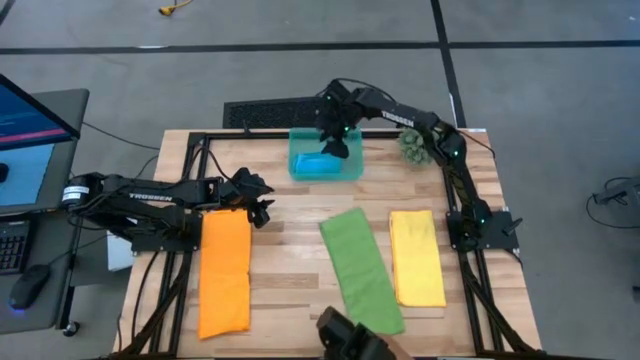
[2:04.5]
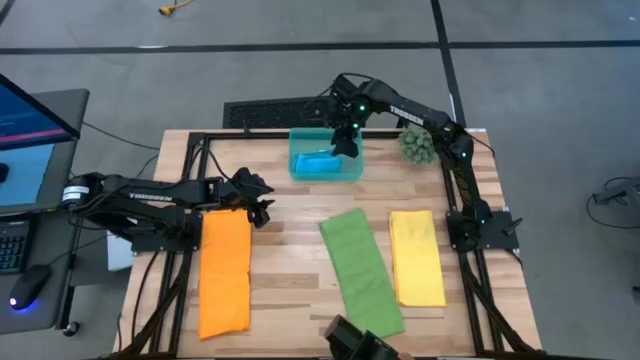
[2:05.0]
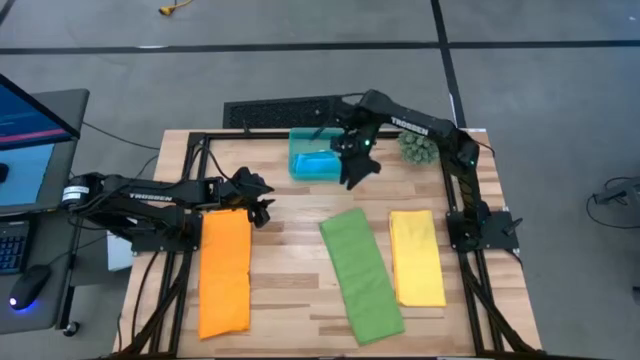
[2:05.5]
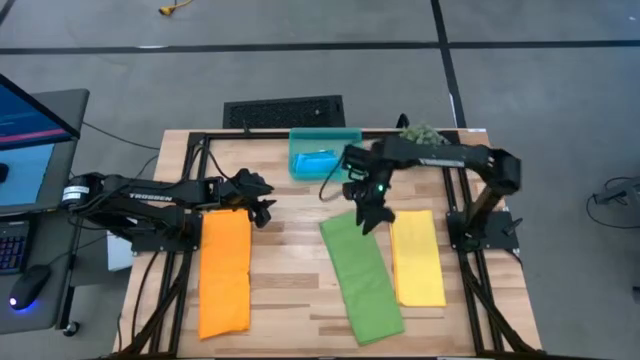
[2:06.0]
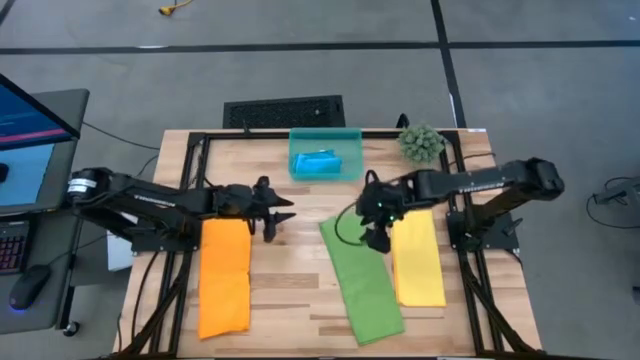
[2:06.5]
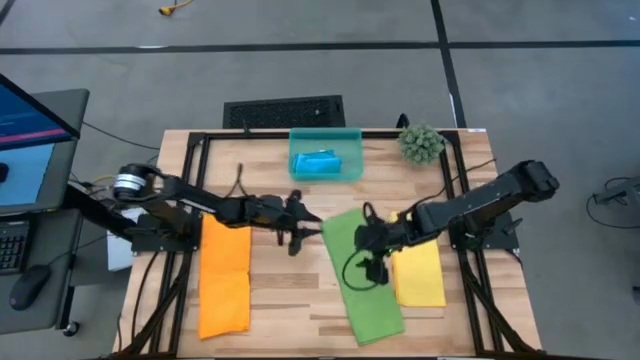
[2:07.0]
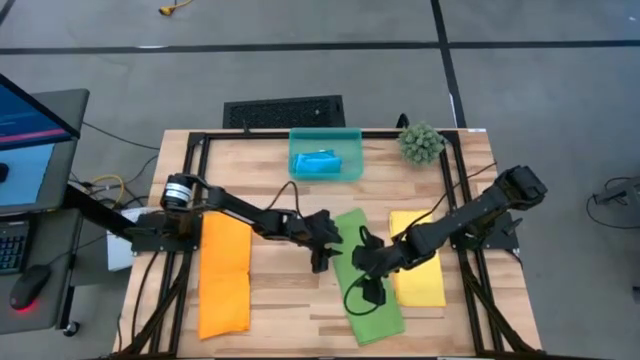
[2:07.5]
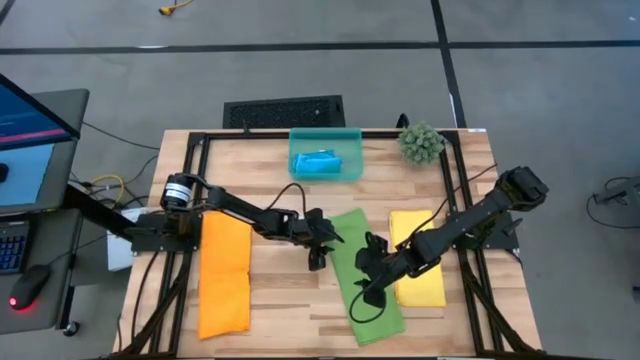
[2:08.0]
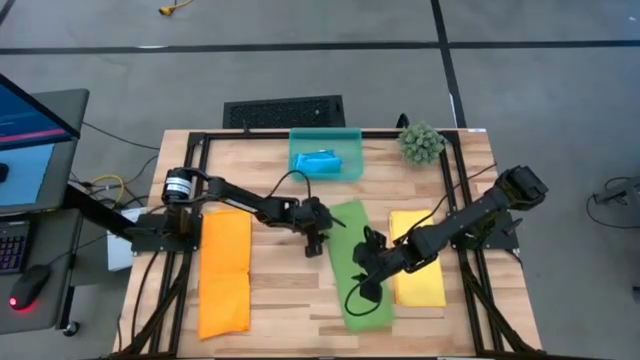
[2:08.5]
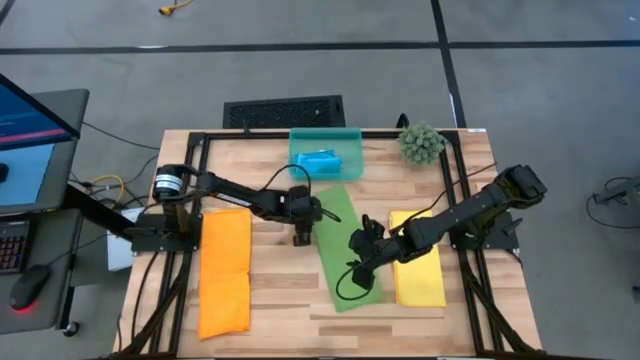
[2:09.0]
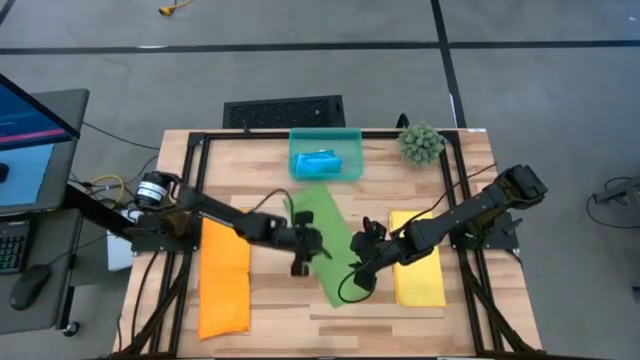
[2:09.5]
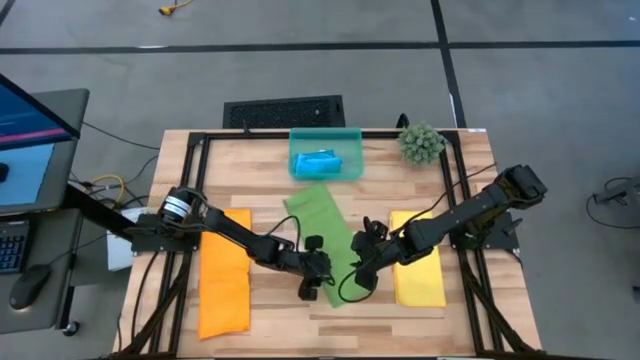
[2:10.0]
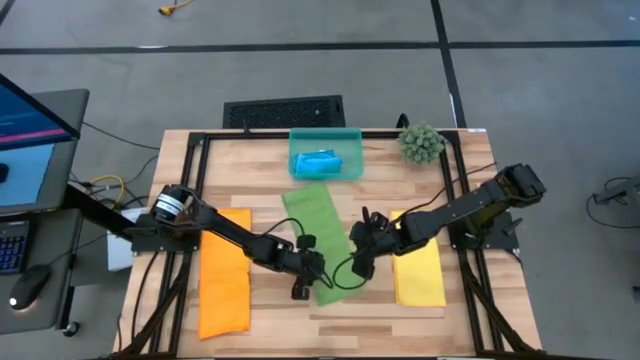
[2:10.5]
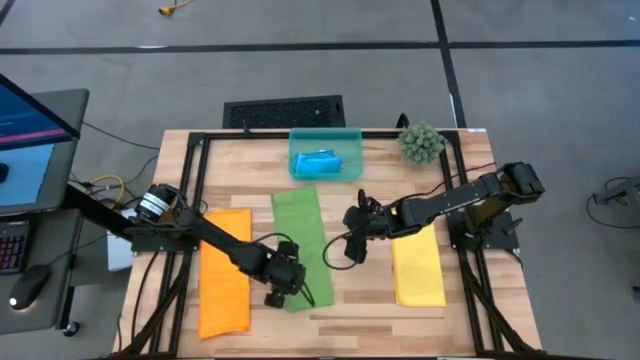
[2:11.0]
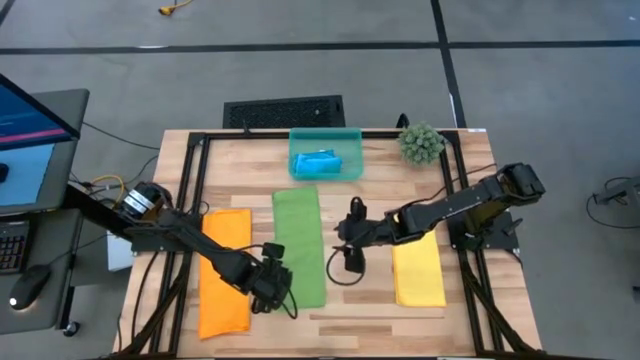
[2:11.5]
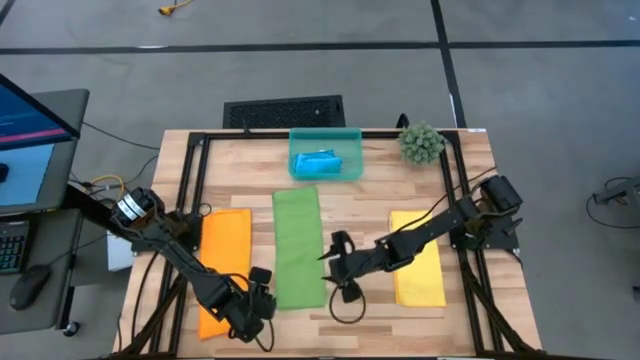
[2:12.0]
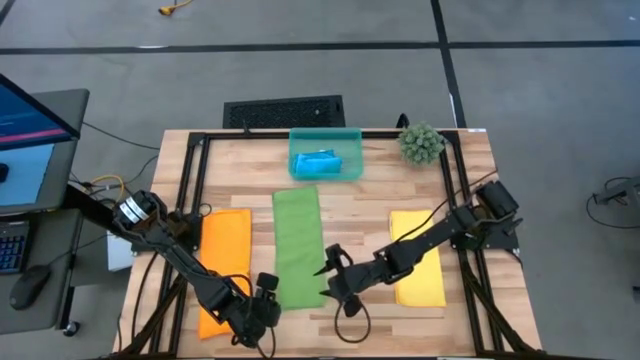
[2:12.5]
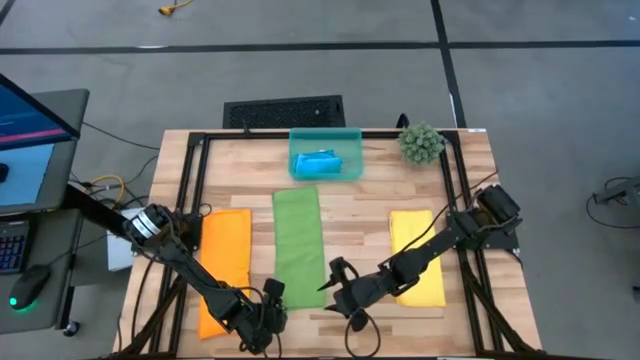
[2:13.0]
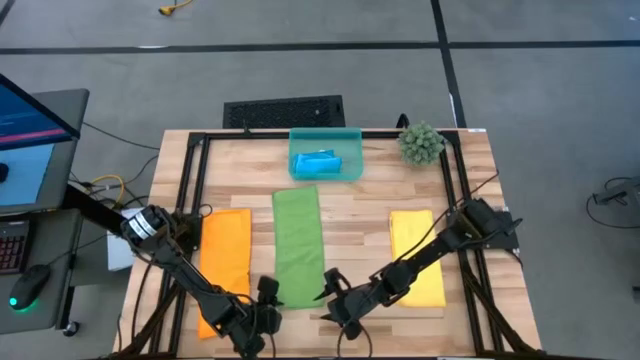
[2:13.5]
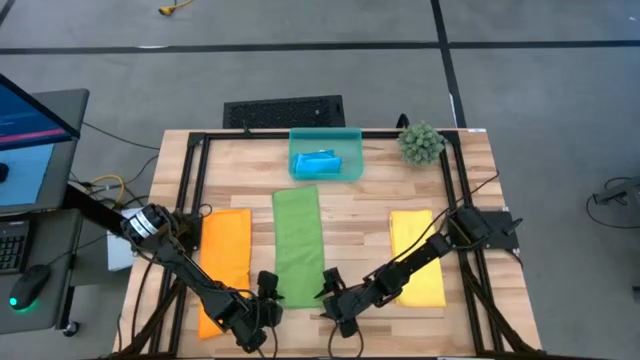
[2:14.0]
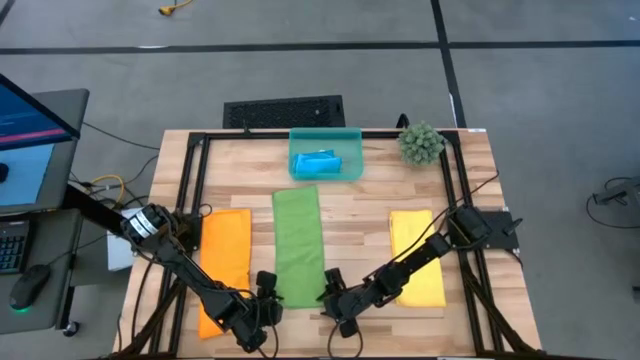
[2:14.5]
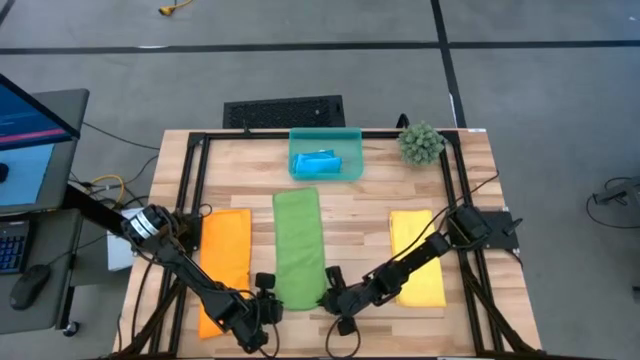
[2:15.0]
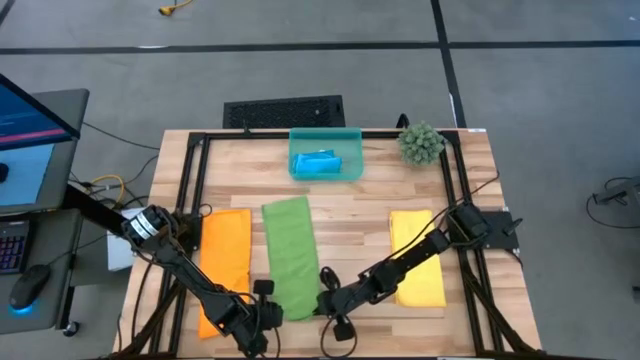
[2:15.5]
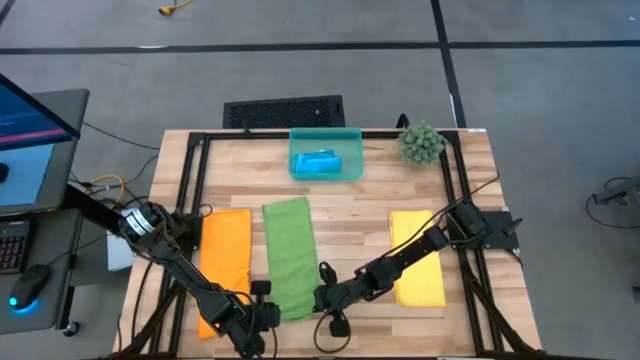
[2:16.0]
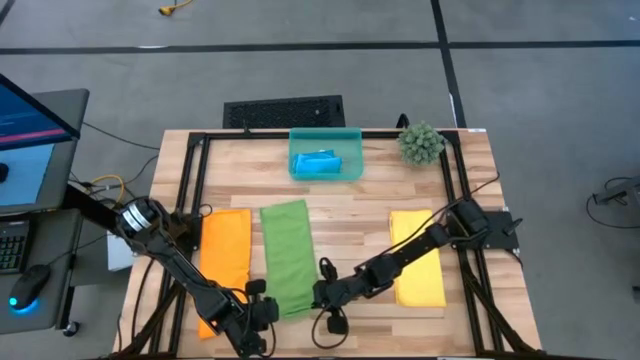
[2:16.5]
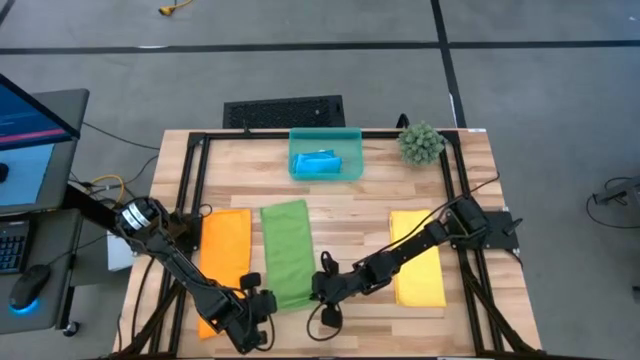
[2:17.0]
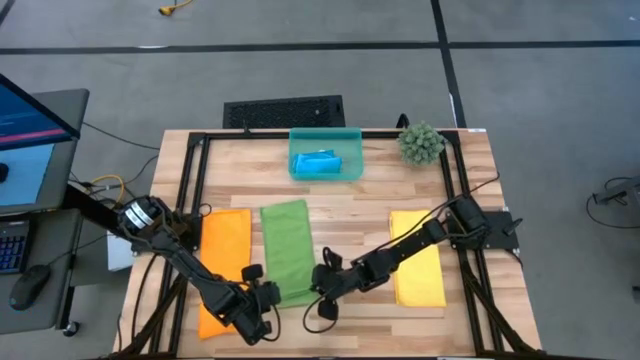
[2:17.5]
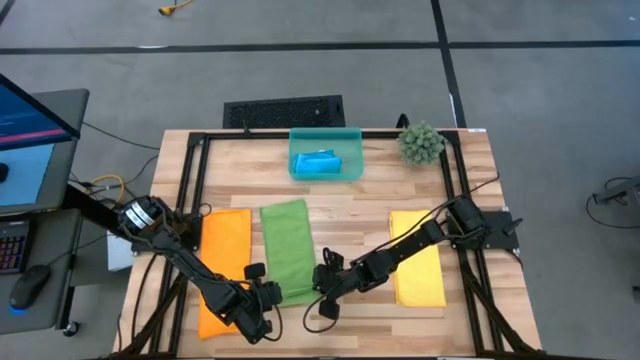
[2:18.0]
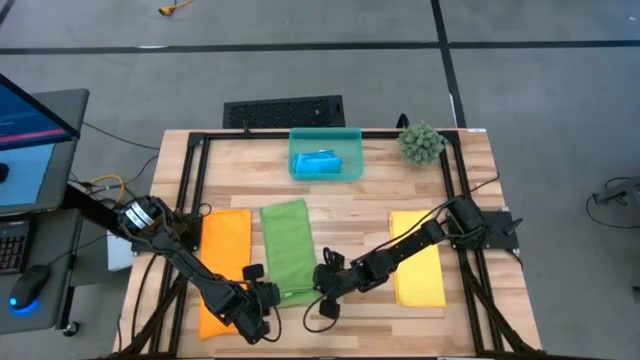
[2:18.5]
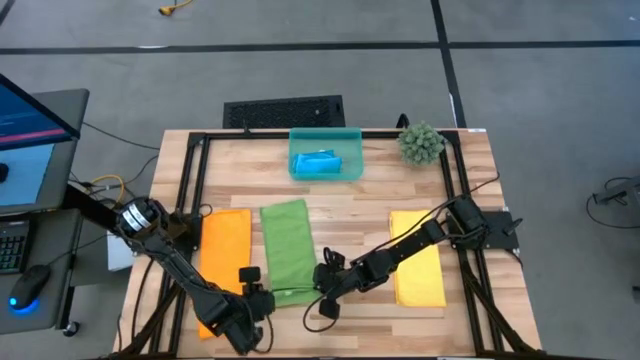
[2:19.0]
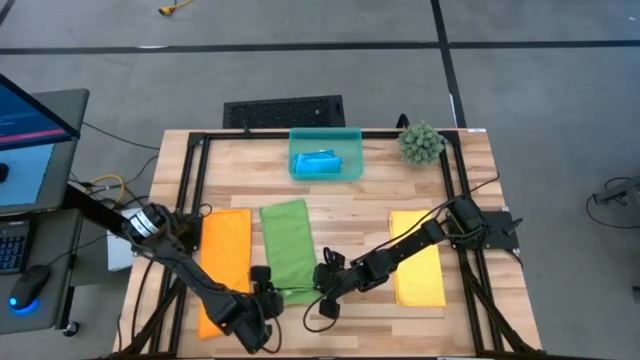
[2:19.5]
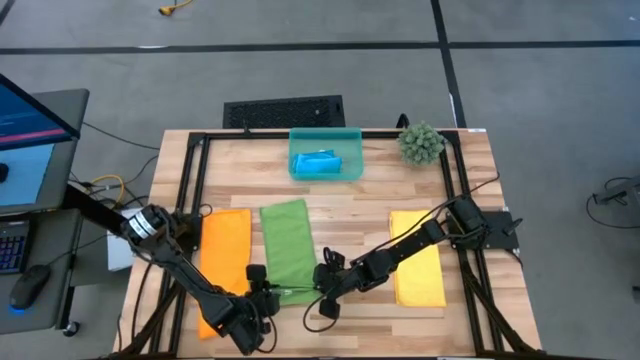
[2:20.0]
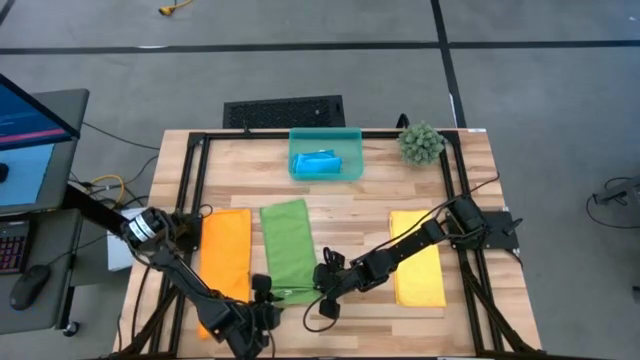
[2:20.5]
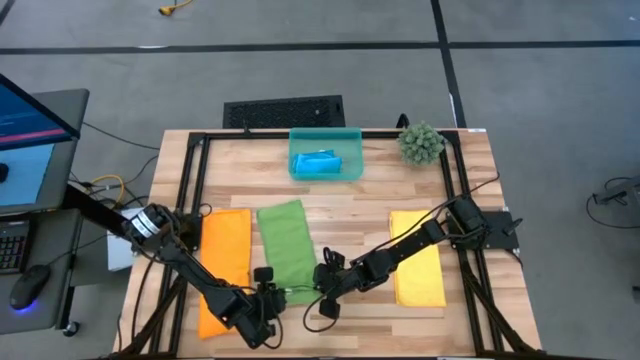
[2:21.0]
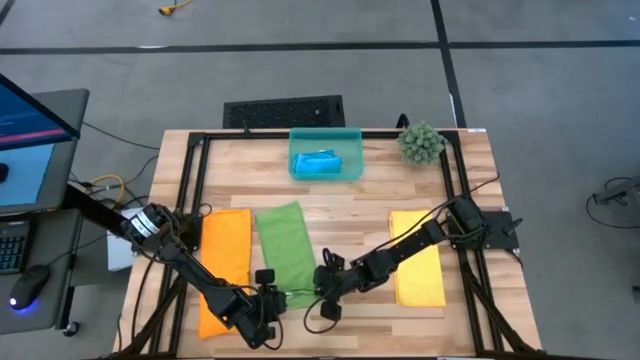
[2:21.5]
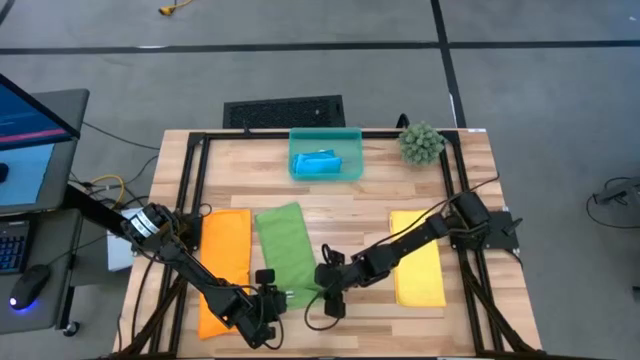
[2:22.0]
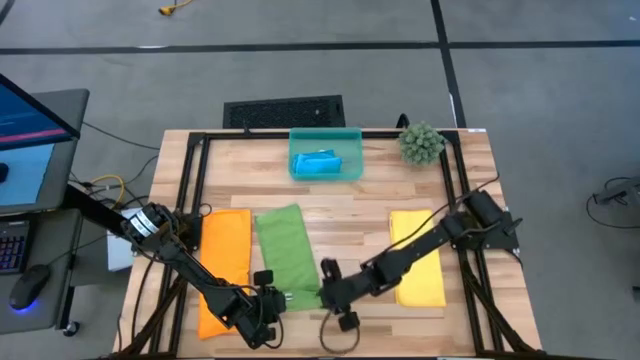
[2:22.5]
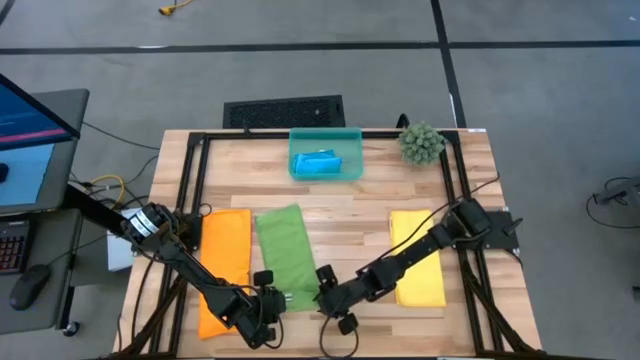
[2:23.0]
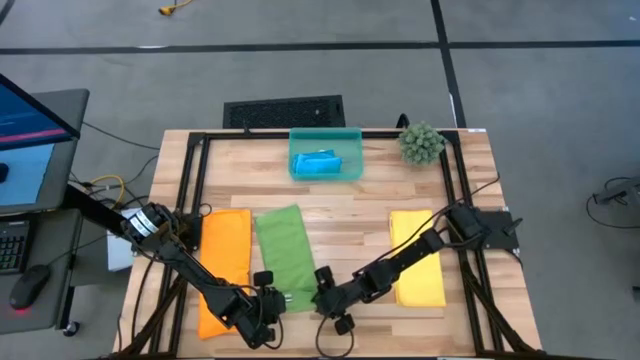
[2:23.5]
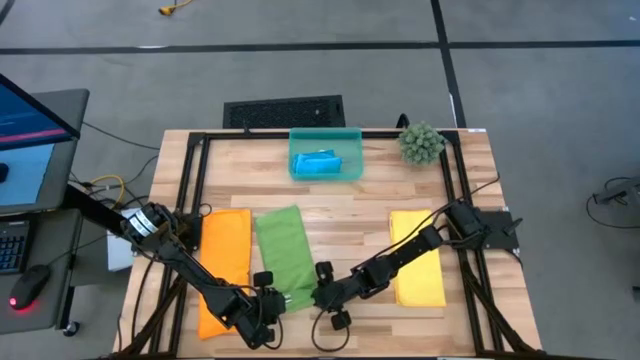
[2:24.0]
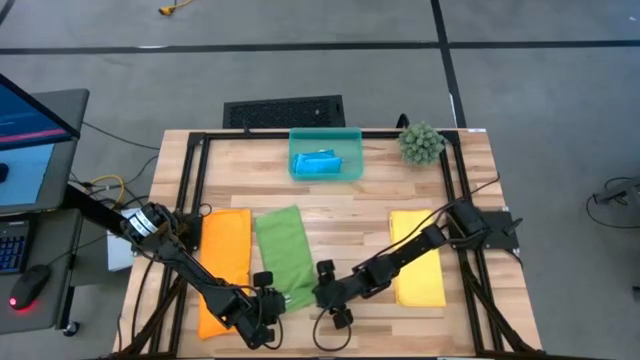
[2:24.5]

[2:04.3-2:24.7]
Task: Roll microfiber towels into tight, uniform cylinder then place into a basket
Roll the green towel

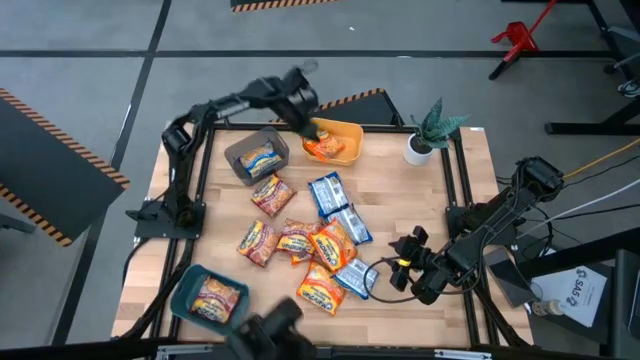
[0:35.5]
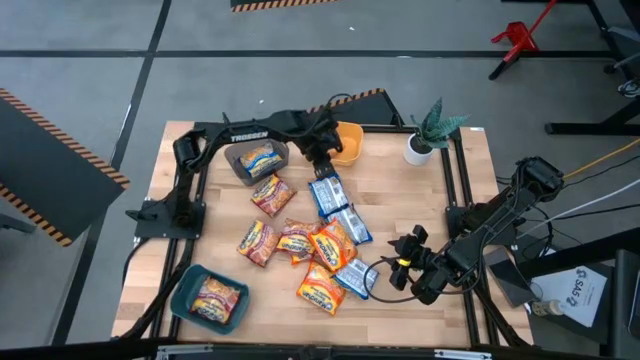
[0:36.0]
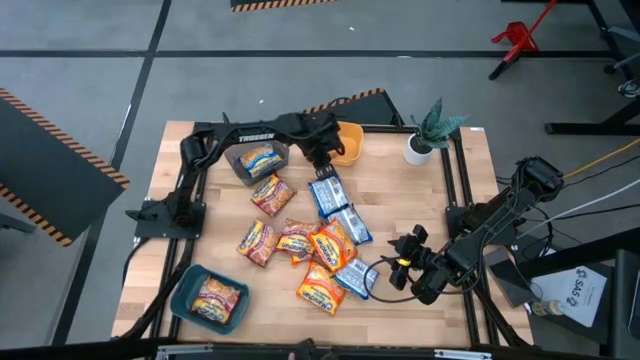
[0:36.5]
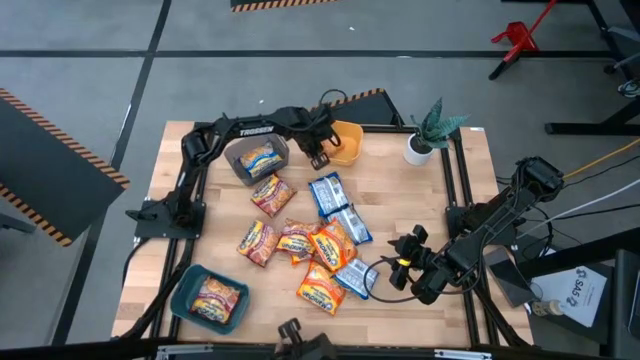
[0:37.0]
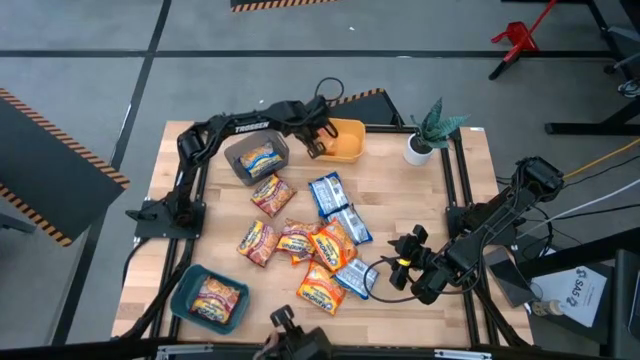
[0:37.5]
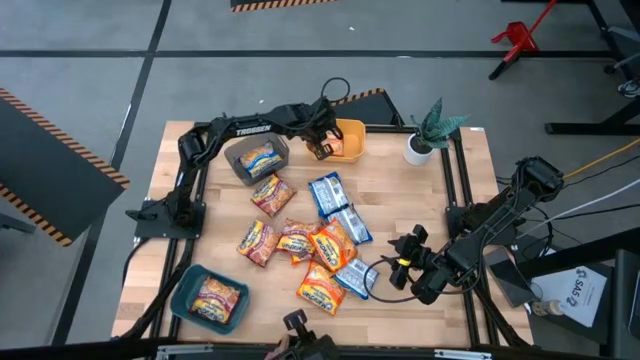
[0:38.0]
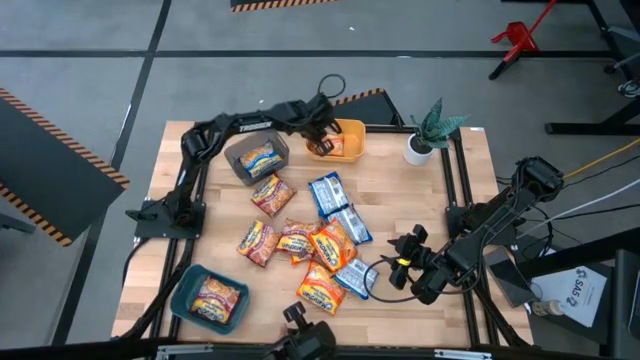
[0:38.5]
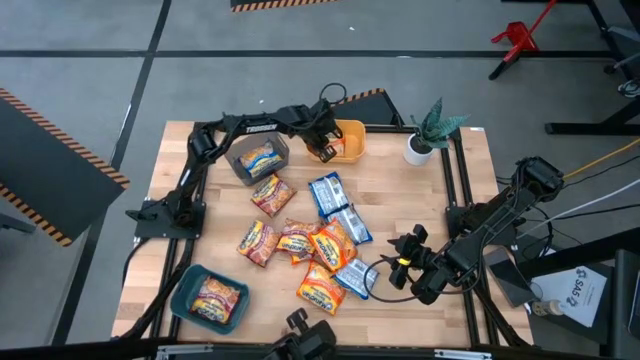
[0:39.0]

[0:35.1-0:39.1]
Task: Sort Maruchan noodles
Adjust the pack of orange ramen noodle soup
